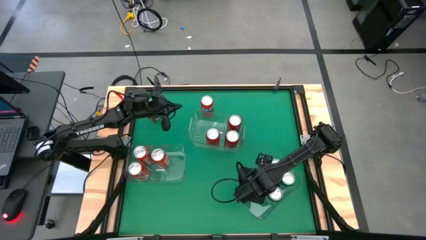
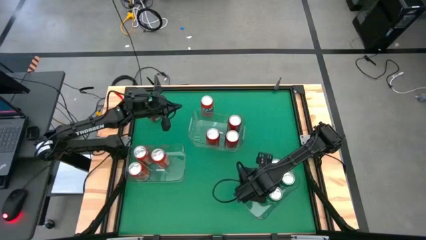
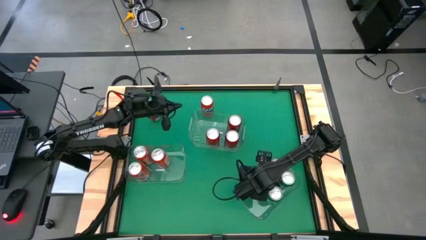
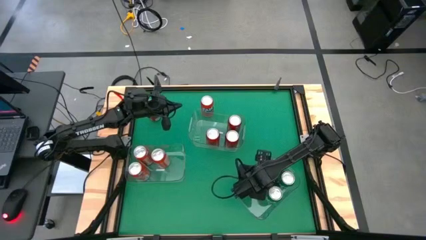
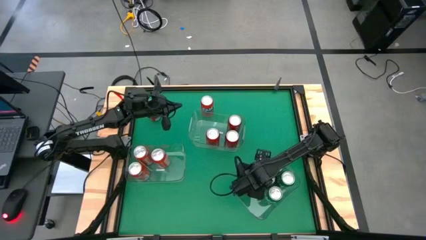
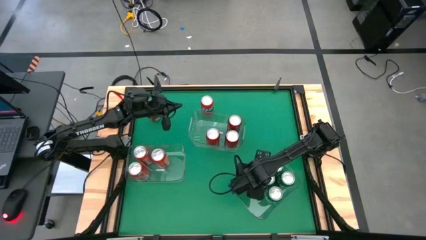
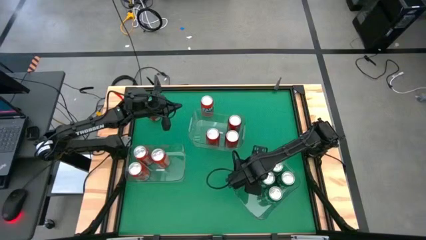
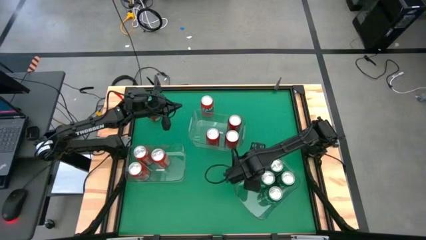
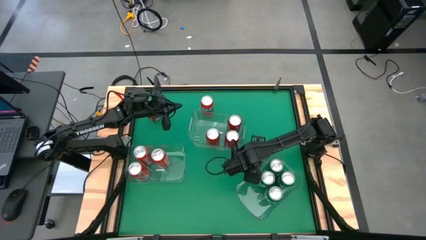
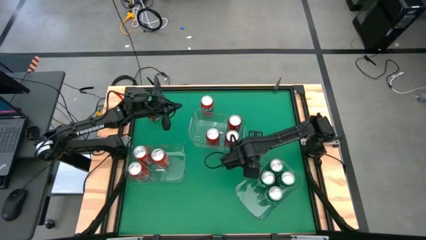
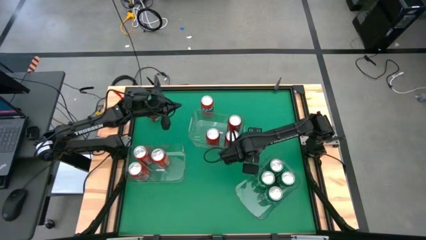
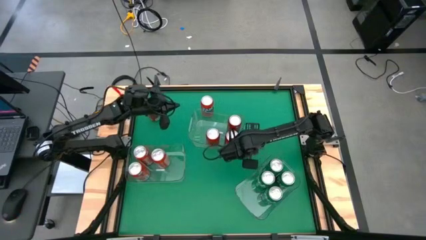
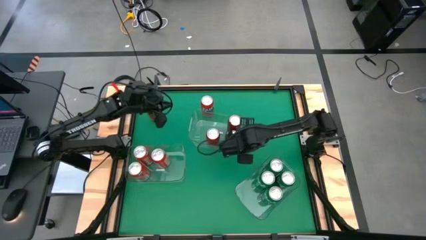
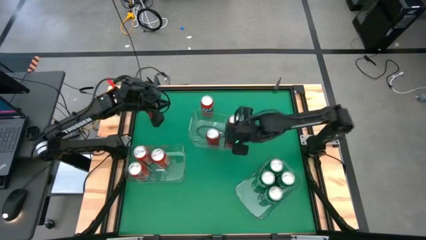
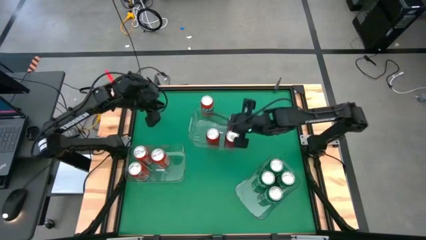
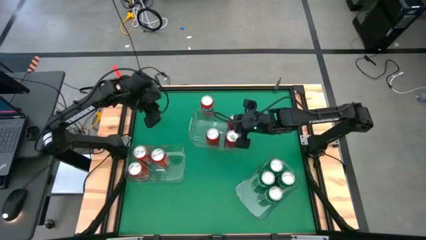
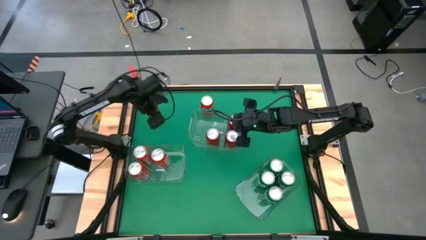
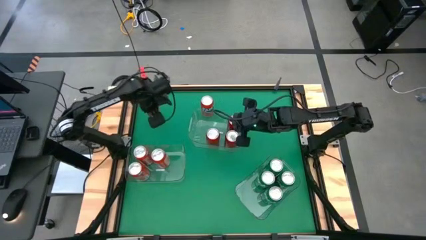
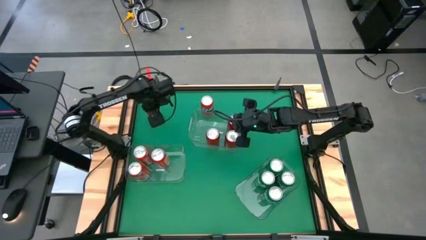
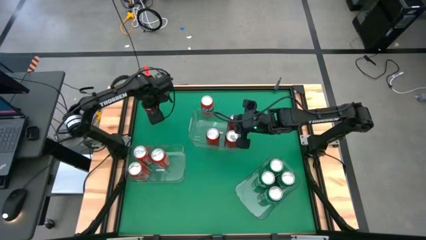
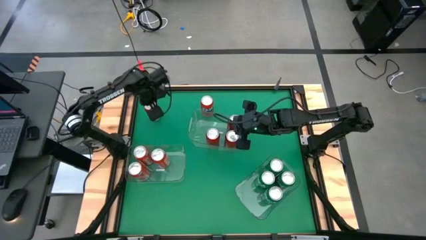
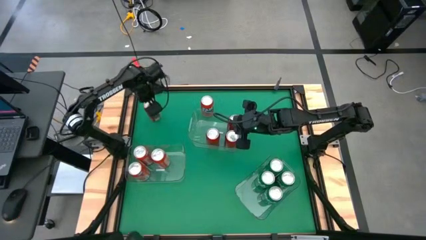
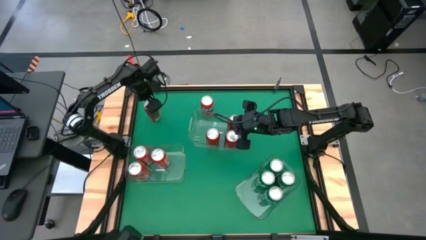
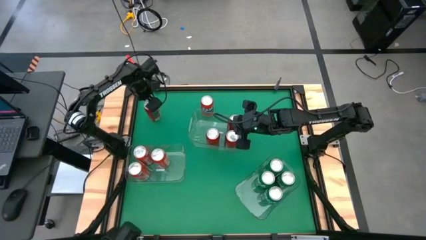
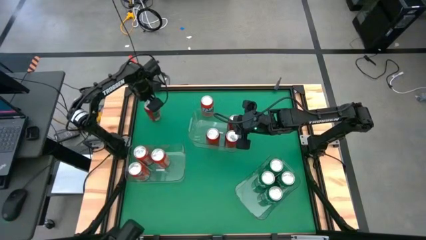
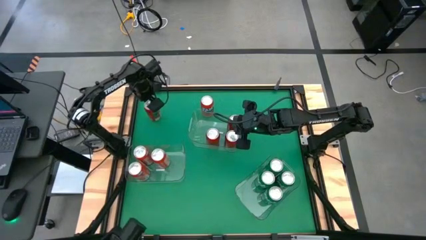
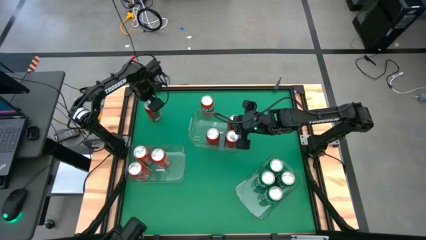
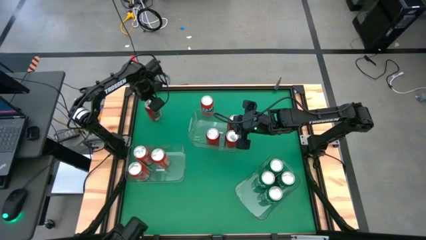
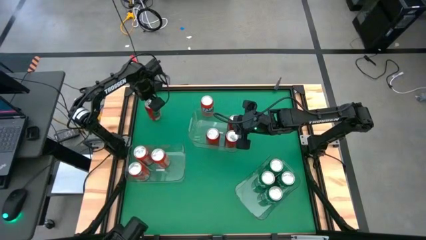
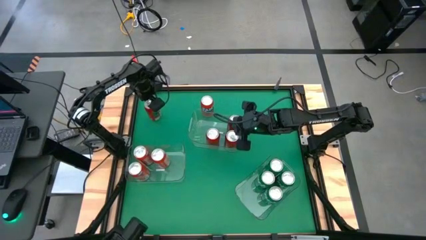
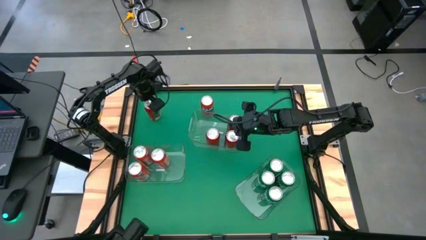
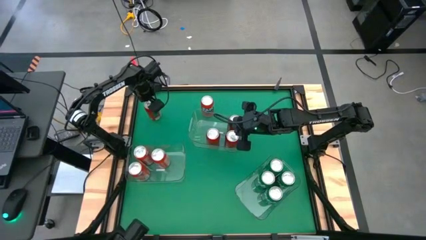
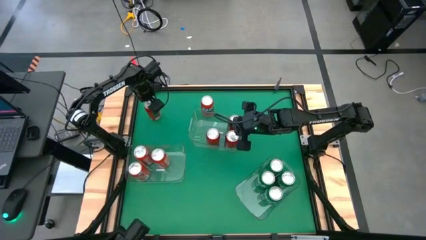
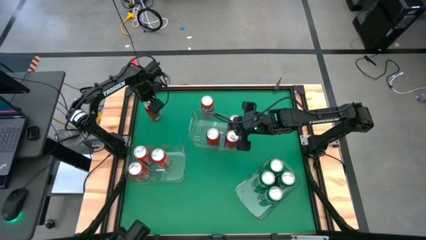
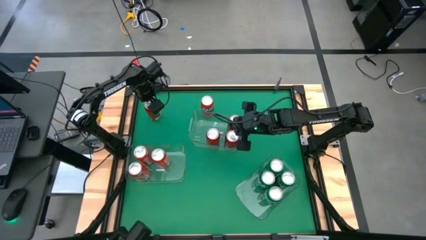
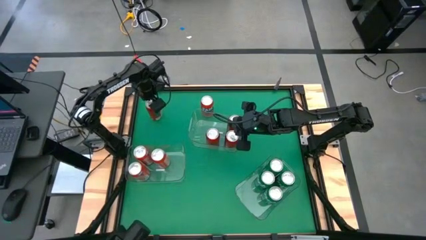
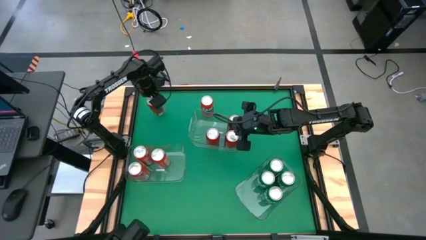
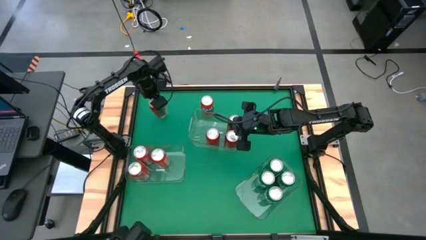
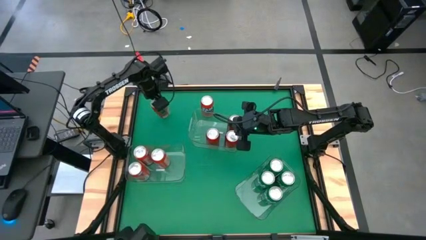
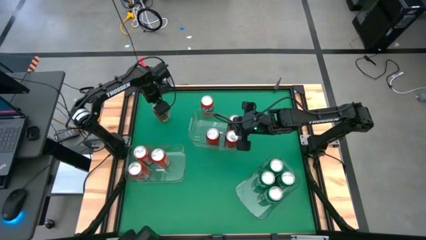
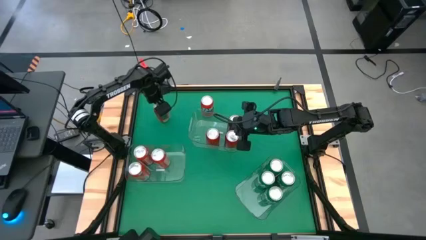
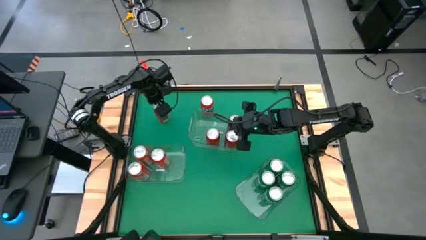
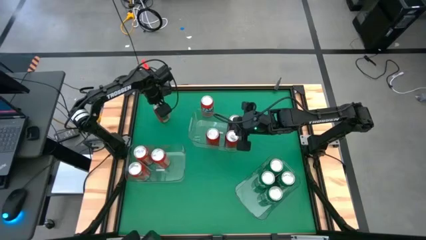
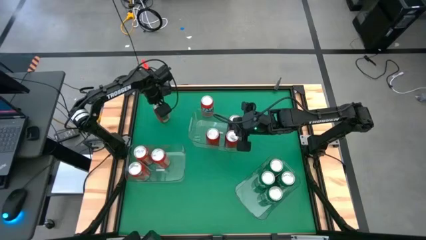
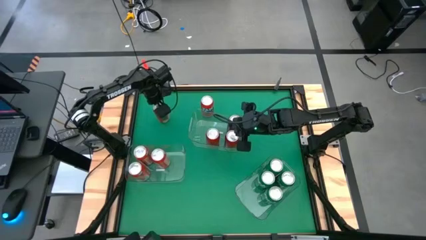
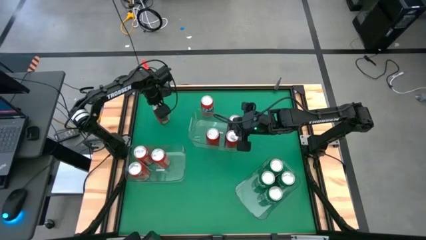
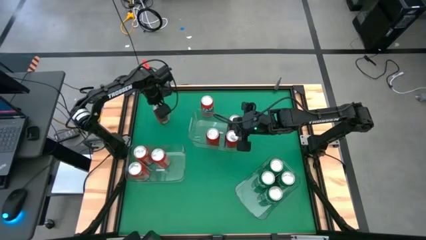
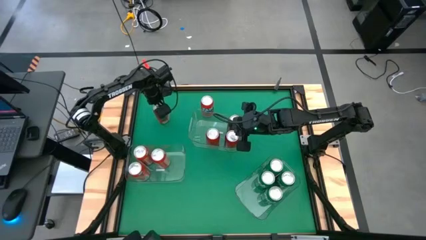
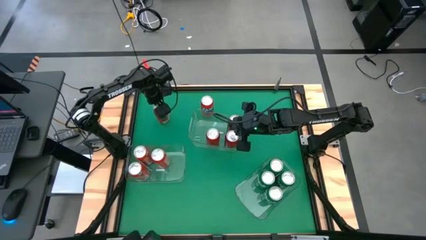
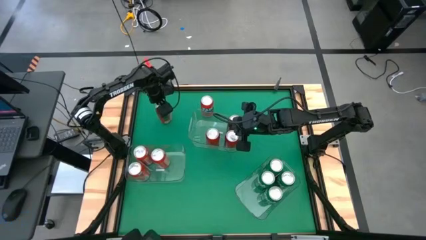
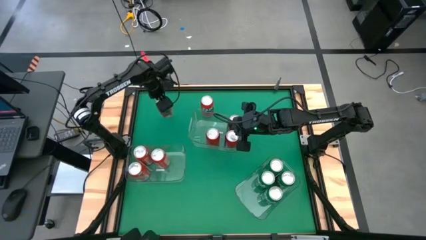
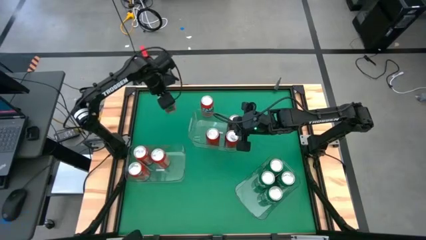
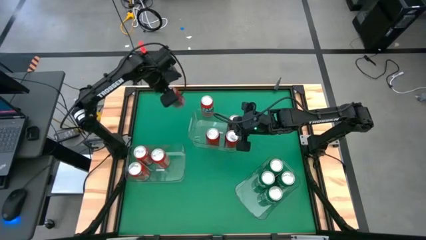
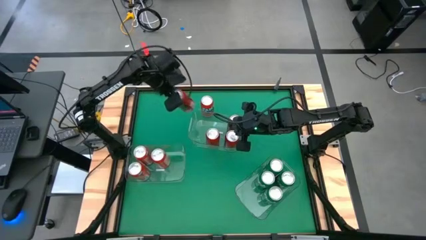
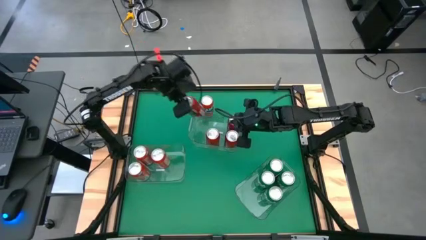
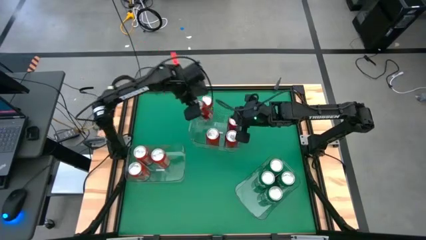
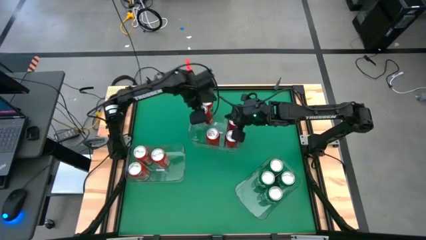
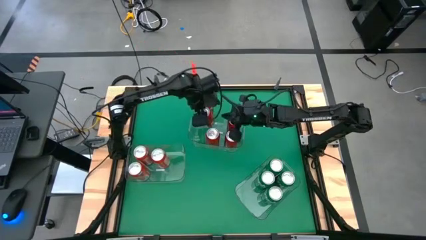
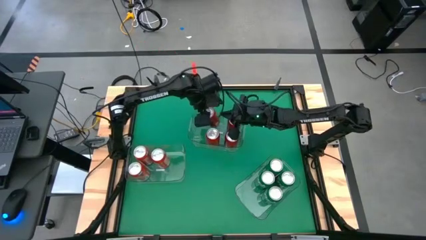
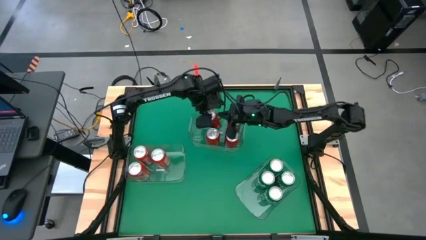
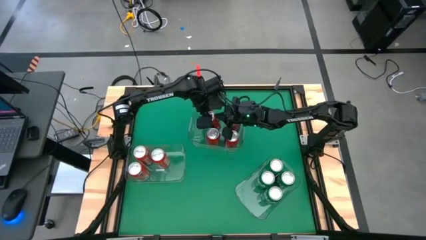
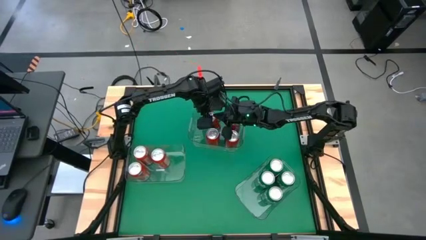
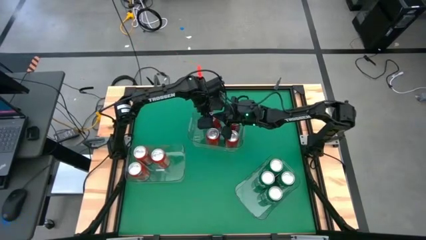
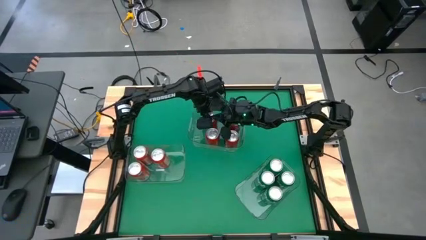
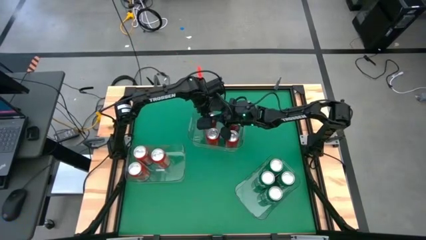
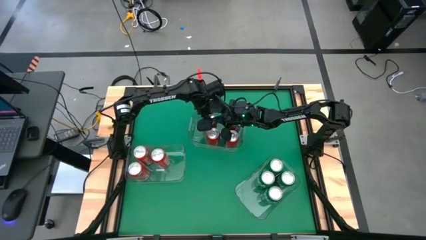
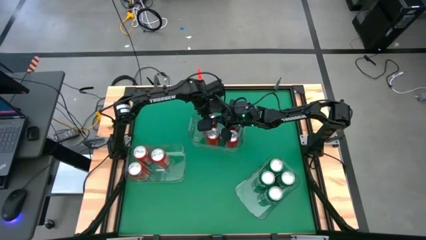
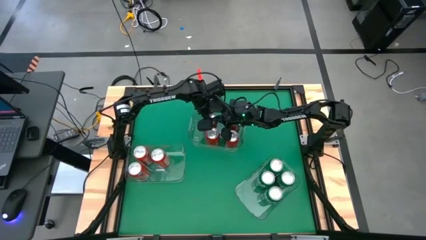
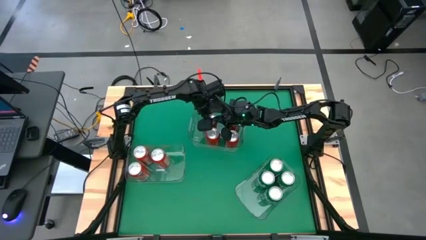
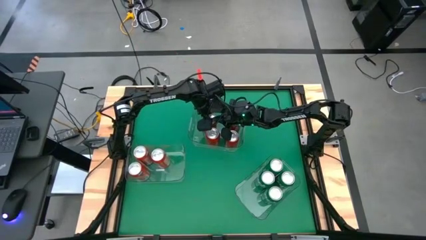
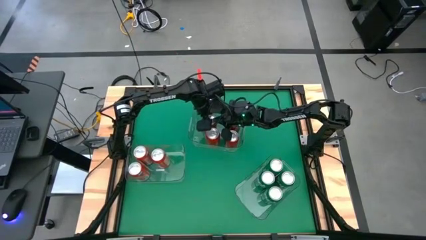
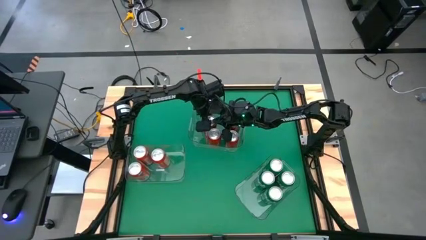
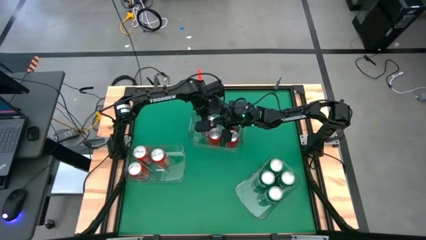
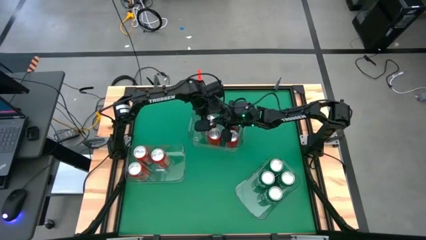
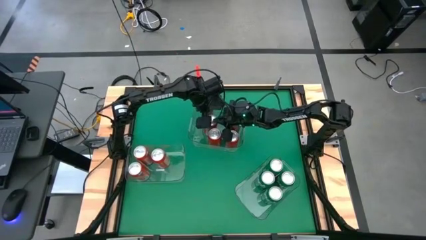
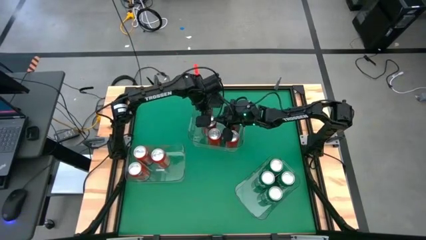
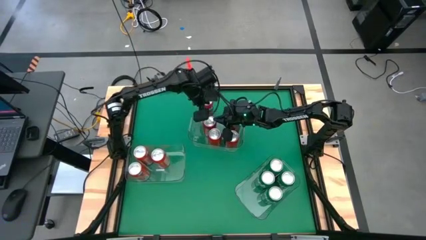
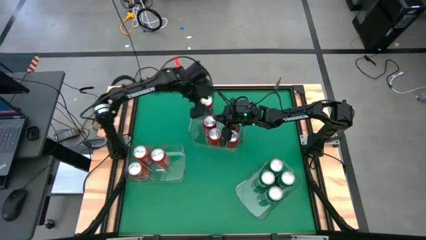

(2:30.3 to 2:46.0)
Task: Sort soda cans
Put the red black soda can into the top transparent bin

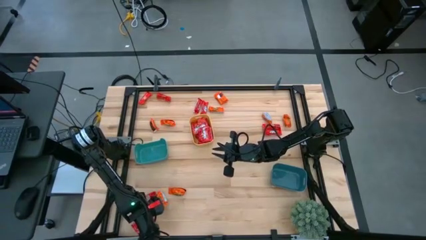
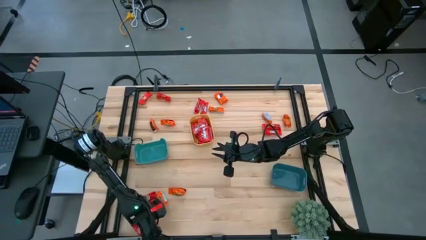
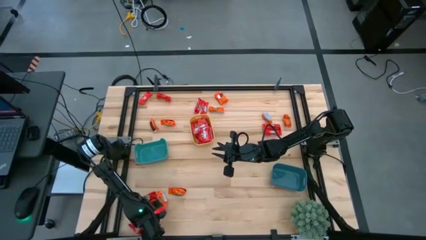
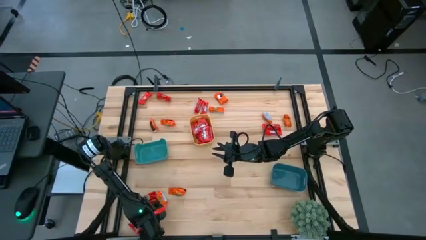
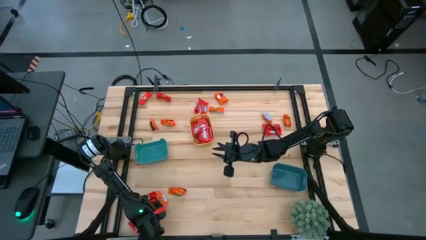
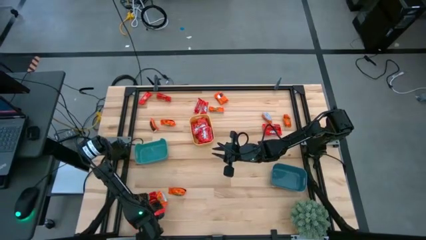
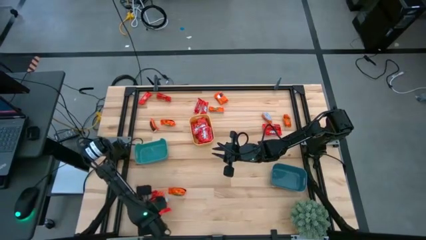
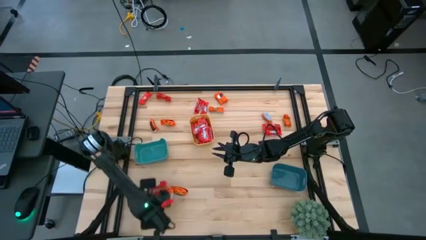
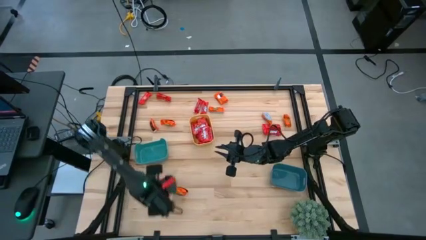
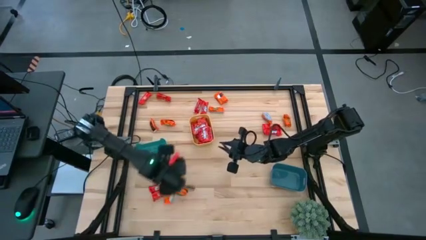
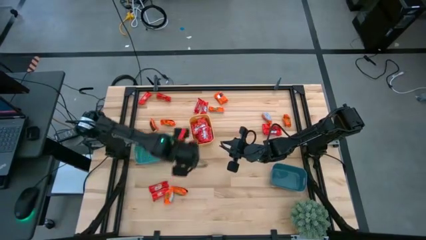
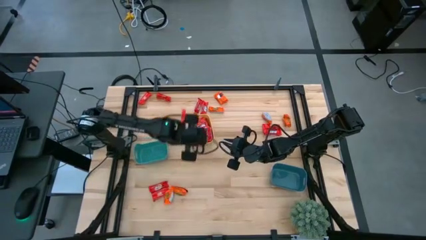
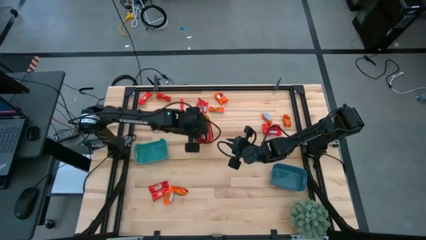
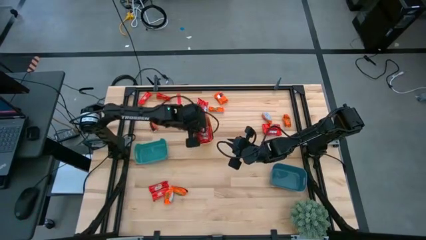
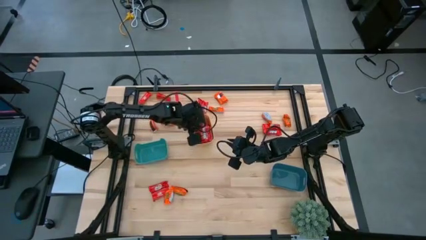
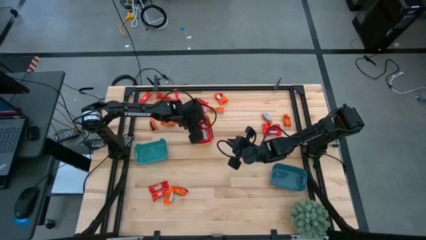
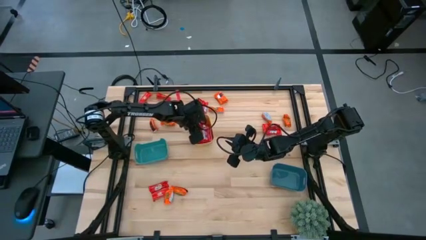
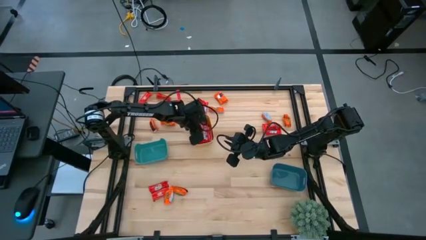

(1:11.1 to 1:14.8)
Task: Sort candy
Put the red candy into the yellow bin
